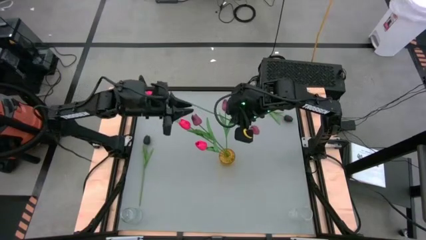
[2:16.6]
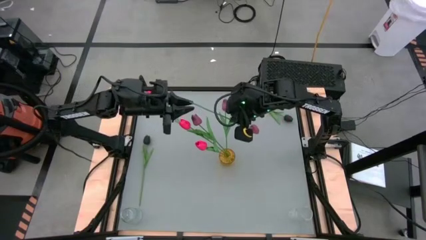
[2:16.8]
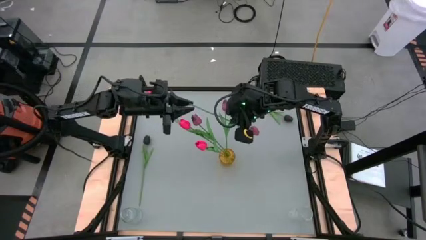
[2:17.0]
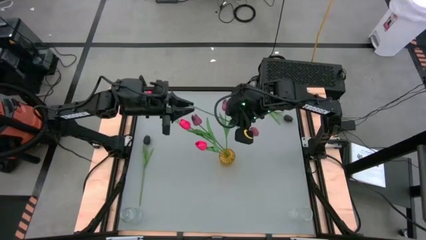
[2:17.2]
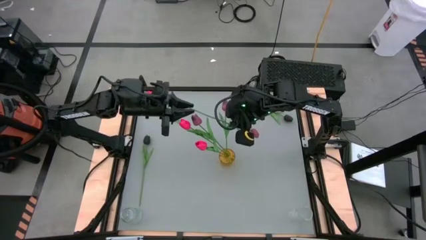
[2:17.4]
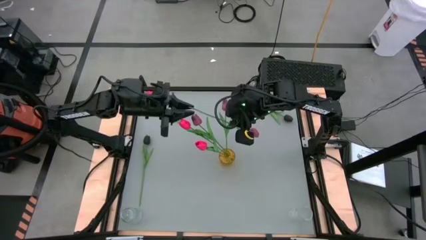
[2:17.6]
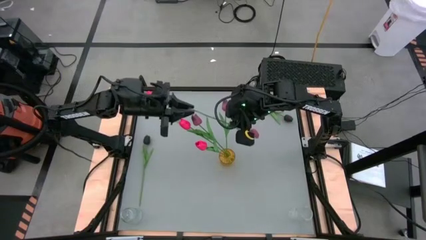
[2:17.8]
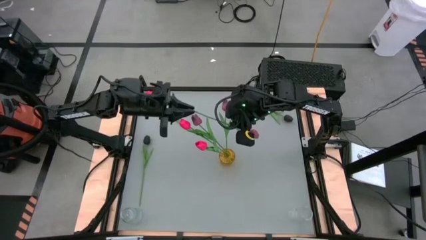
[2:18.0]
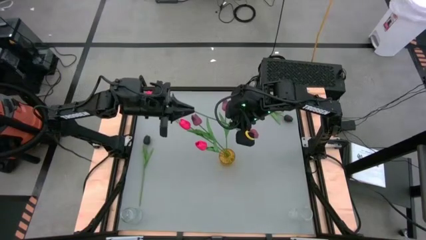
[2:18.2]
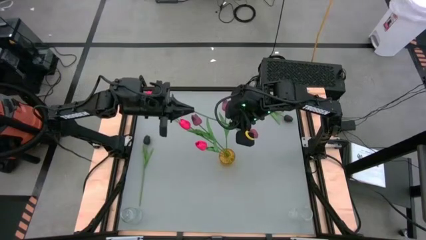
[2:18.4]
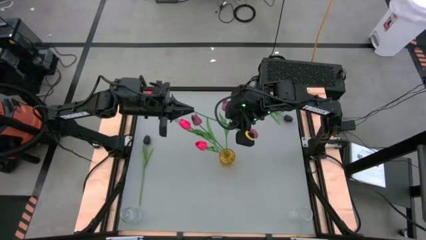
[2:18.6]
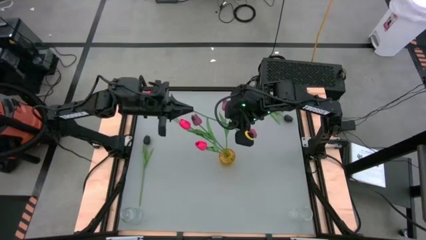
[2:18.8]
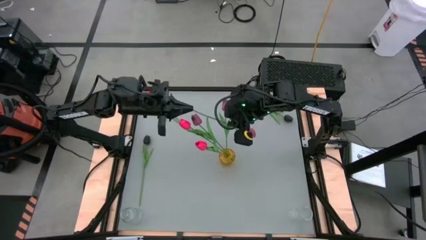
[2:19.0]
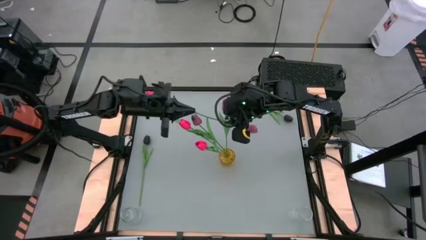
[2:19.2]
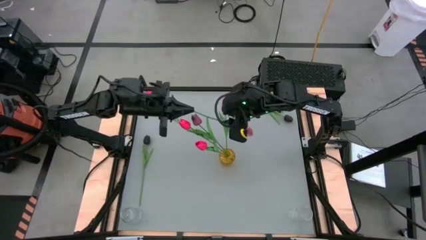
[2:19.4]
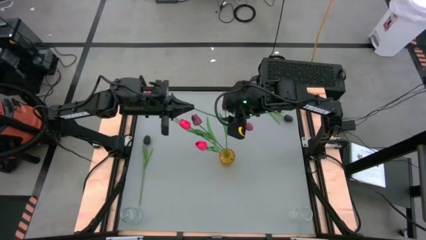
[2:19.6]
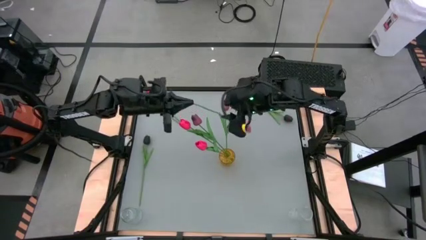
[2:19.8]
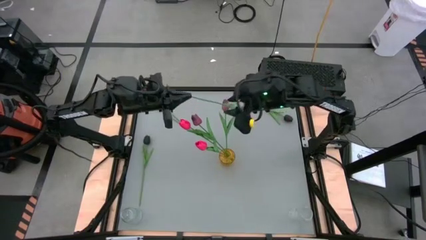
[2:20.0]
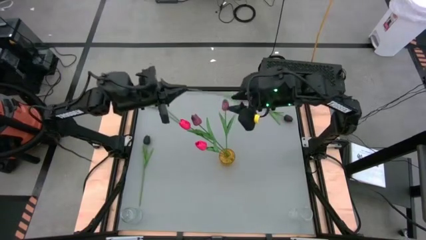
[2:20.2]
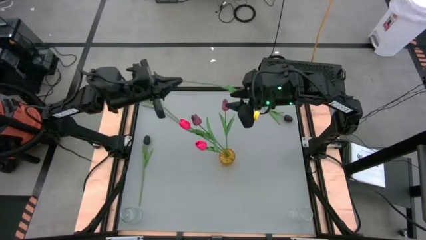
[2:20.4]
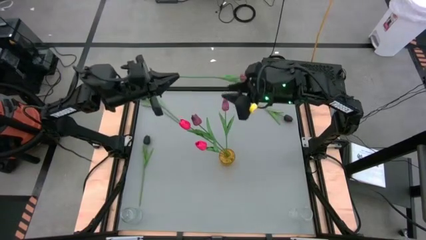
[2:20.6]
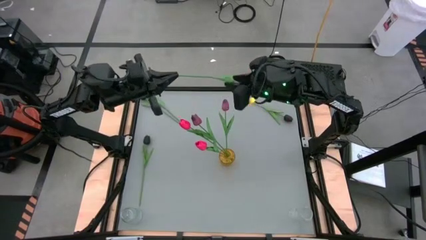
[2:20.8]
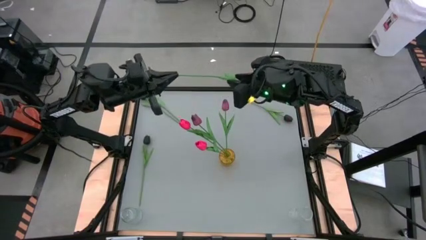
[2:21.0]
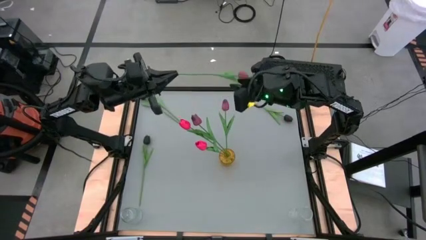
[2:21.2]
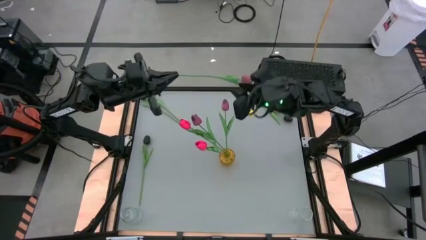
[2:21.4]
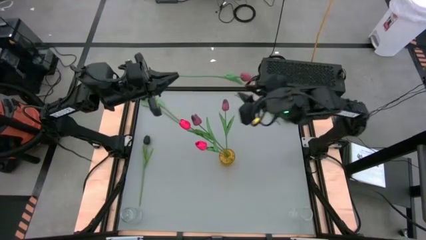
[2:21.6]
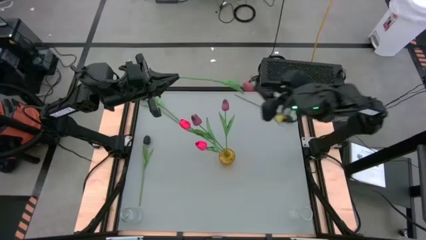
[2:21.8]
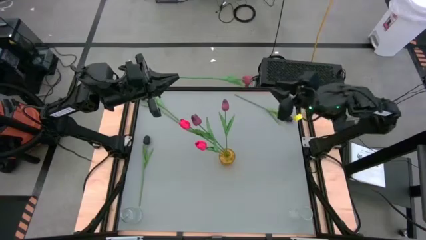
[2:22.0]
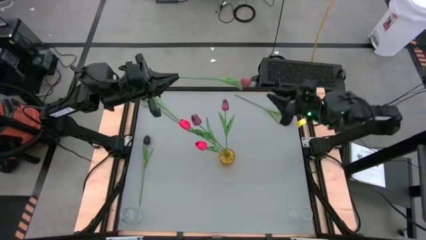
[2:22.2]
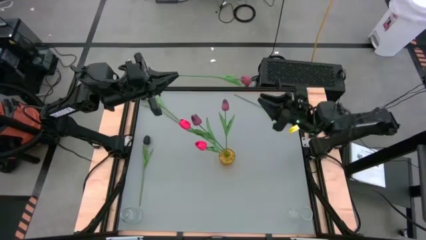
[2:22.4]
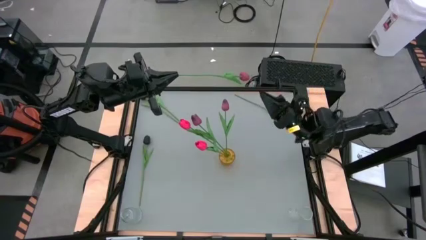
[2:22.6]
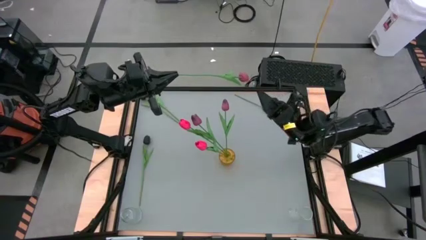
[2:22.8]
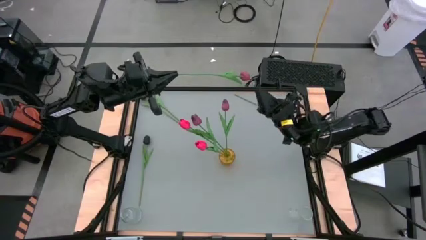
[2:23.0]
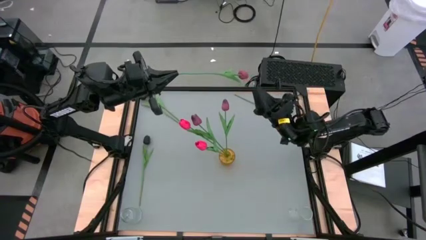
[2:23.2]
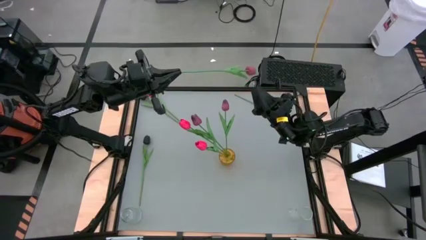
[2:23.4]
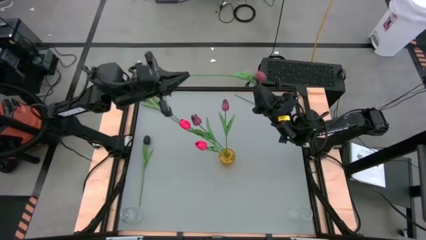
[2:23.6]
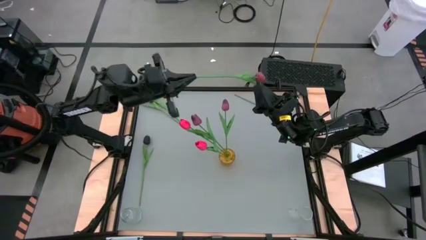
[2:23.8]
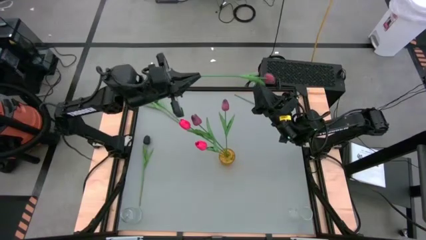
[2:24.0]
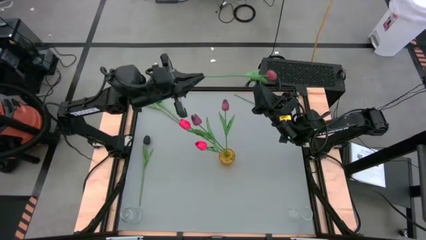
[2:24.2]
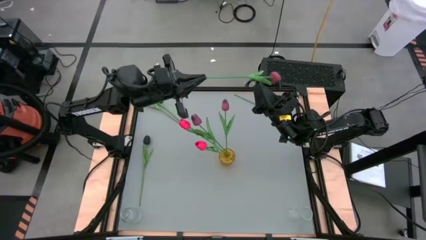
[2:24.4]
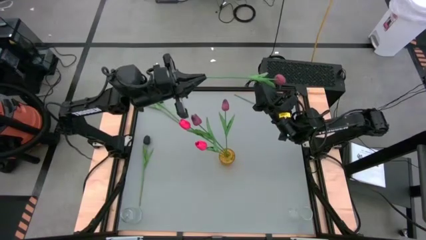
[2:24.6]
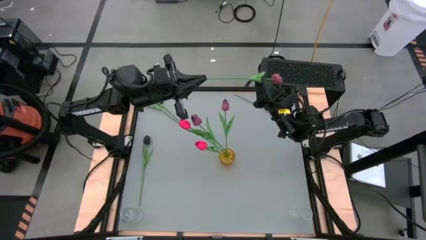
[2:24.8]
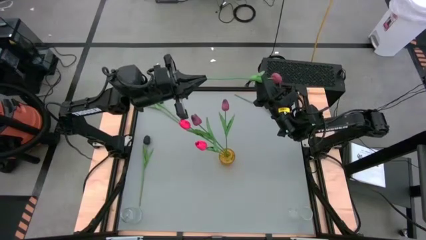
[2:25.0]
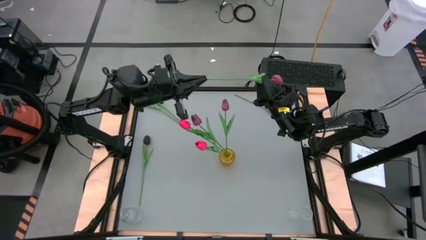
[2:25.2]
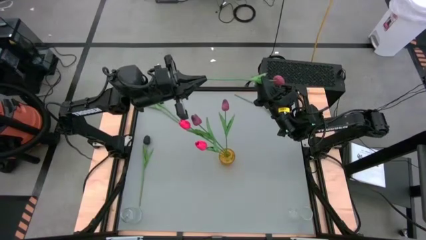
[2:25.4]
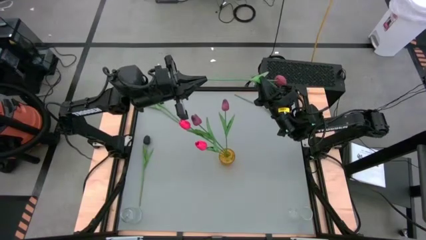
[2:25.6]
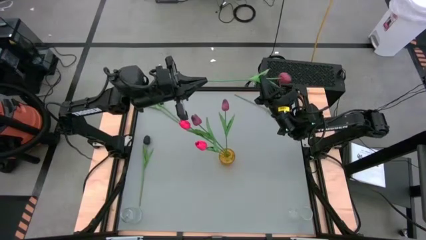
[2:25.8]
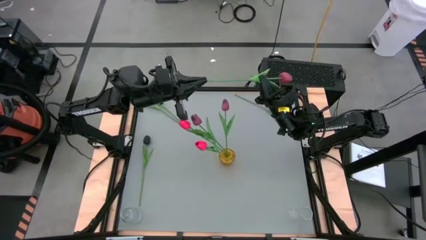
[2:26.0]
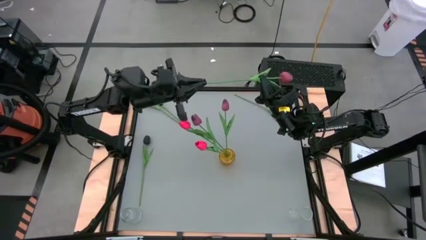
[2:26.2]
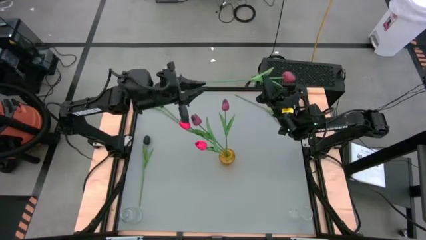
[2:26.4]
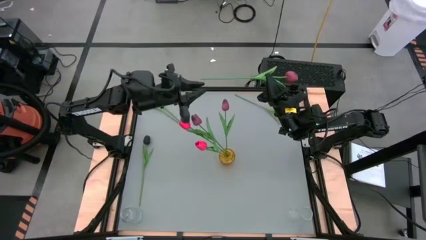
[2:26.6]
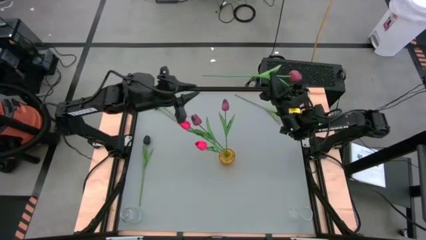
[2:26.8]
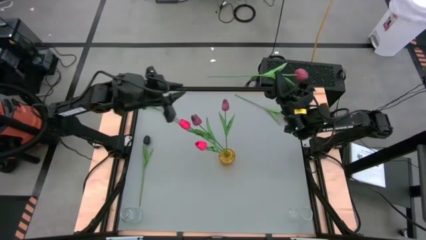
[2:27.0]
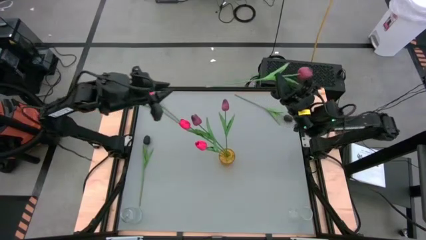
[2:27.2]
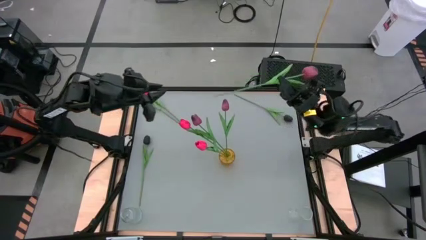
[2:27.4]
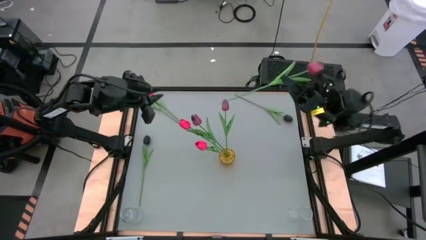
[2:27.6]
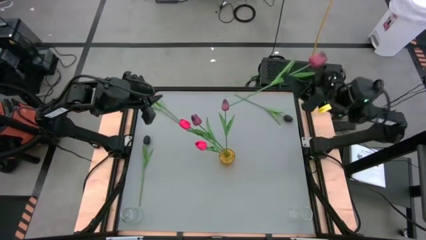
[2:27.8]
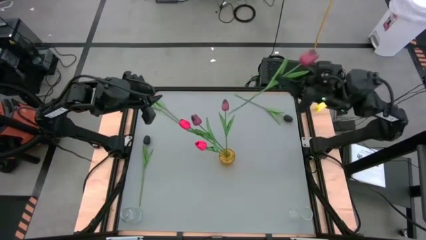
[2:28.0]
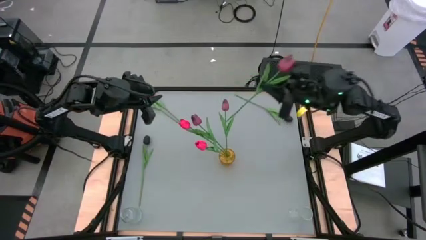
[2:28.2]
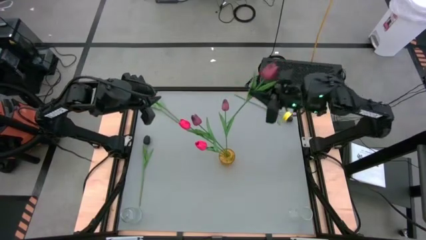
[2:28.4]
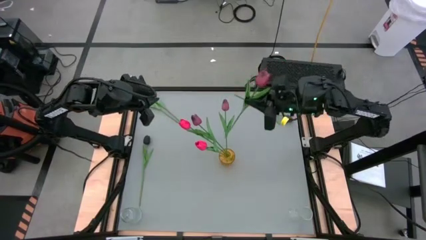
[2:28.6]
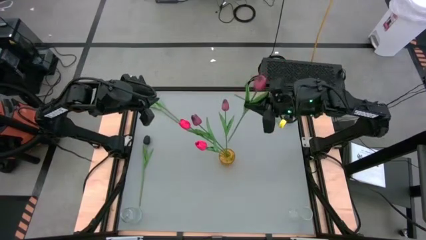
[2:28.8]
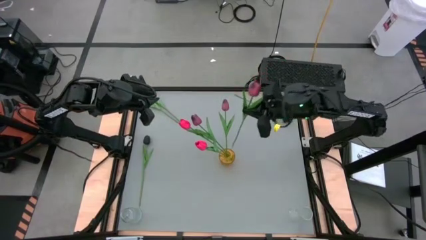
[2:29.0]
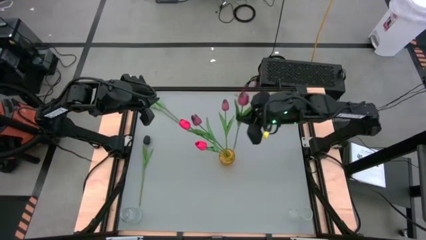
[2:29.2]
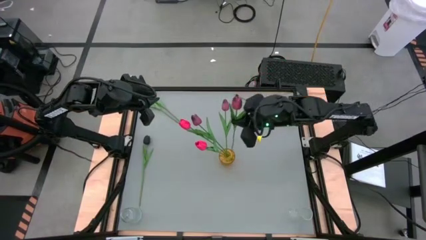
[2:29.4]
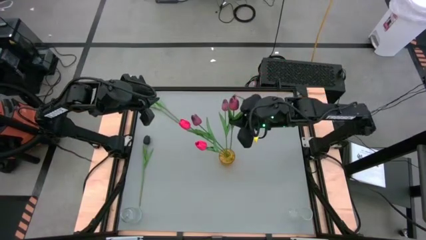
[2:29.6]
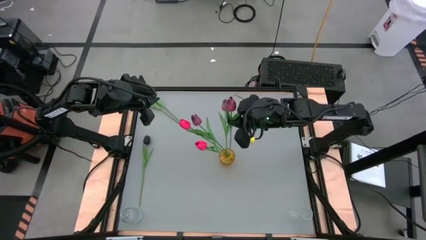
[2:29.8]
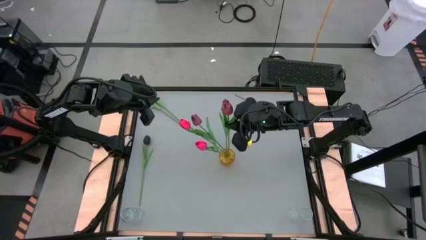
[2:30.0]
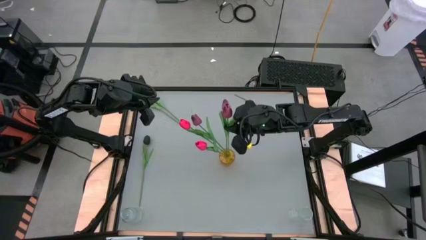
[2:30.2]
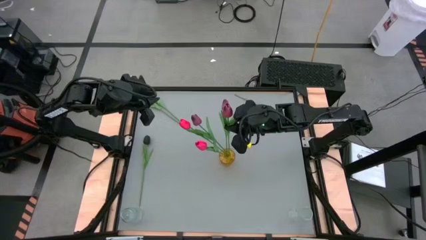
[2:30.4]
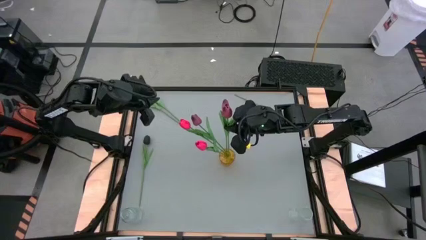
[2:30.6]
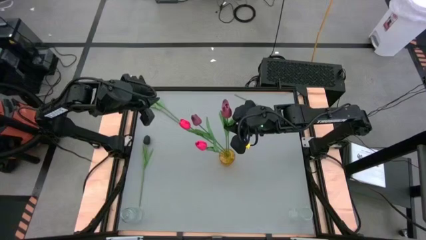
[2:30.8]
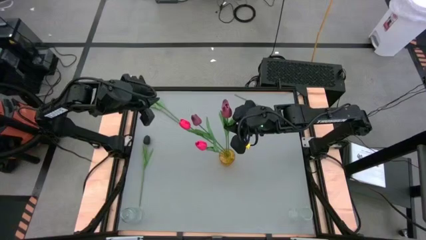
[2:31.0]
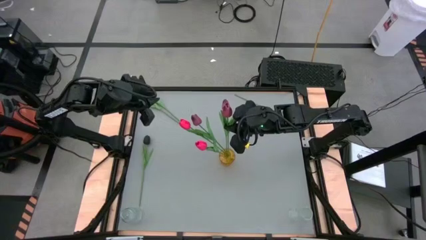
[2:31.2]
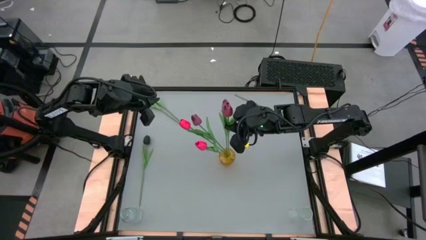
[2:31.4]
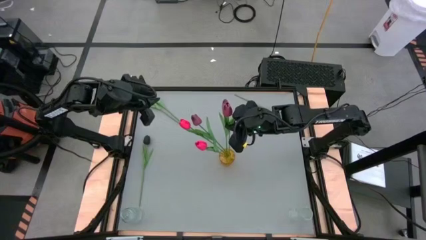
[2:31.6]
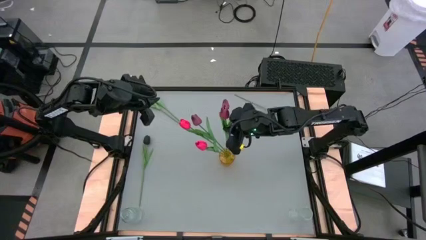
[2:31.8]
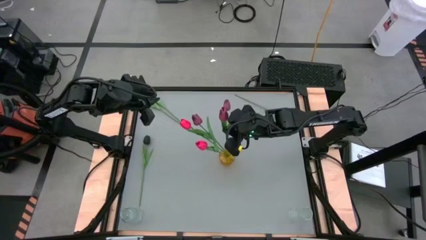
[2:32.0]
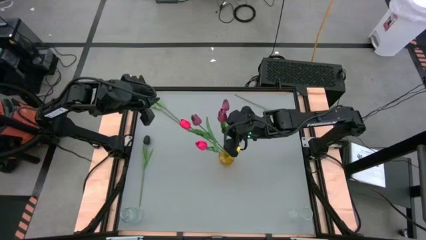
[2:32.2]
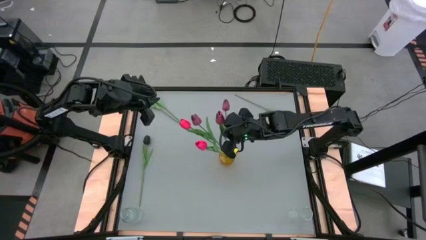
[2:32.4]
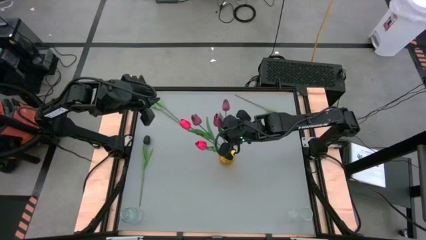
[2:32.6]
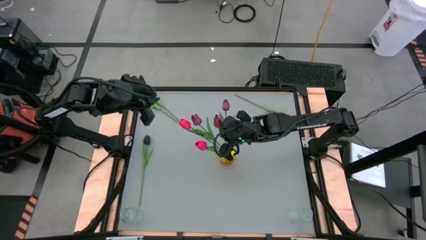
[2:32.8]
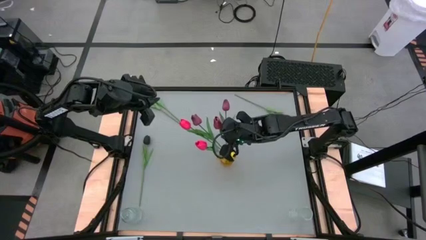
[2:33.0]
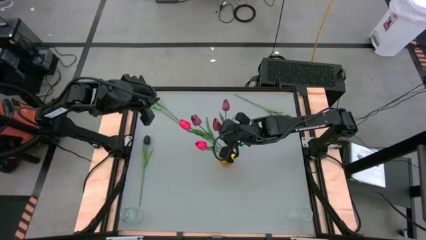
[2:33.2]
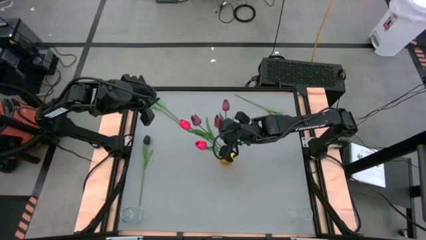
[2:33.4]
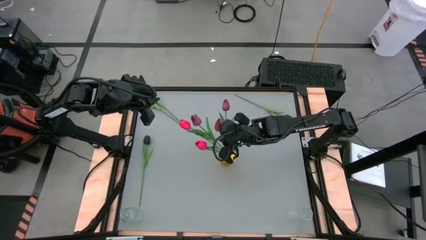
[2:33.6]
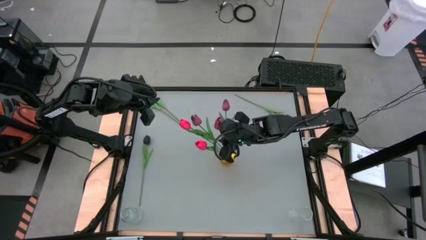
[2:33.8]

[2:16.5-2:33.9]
Task: Sort flowers into vase by color
Put the red flower into the yellow vase
